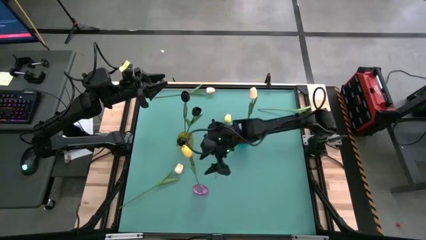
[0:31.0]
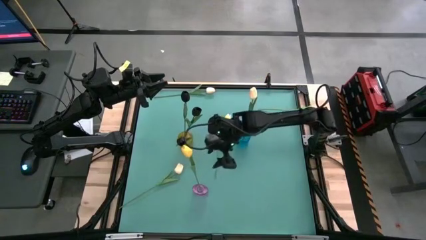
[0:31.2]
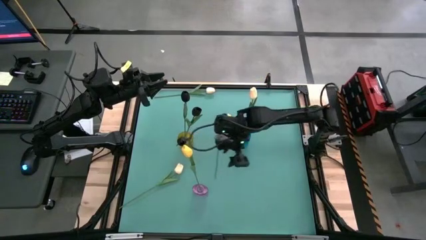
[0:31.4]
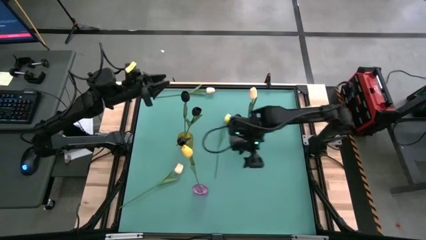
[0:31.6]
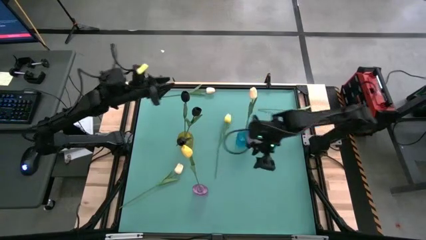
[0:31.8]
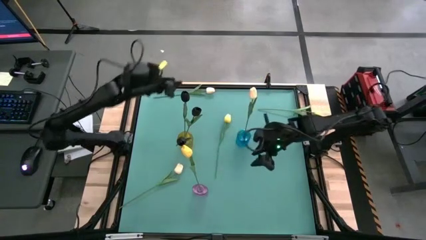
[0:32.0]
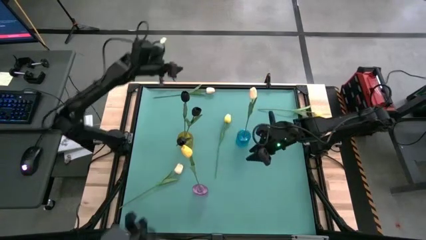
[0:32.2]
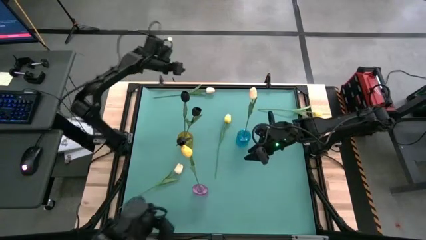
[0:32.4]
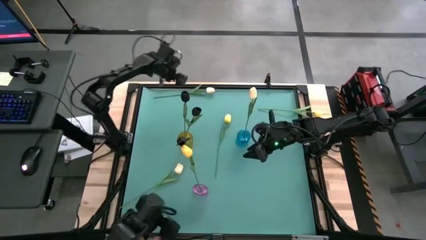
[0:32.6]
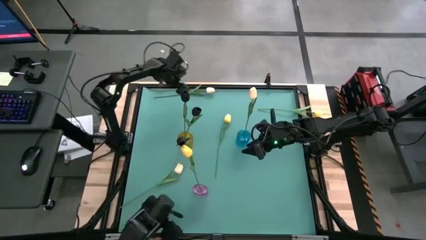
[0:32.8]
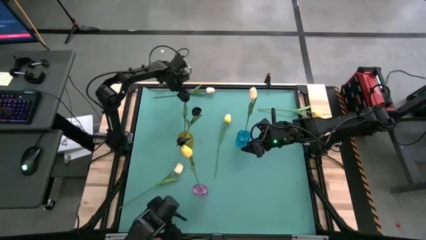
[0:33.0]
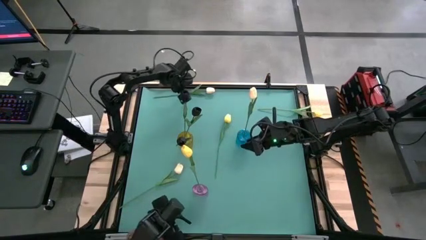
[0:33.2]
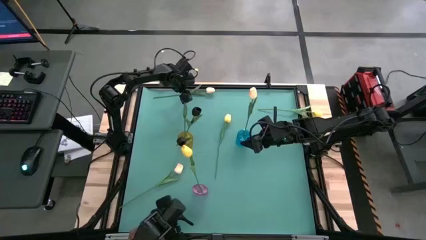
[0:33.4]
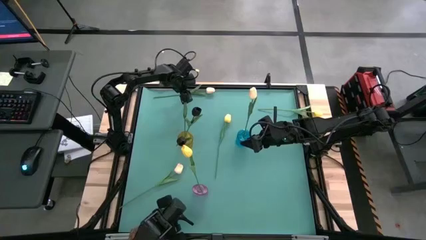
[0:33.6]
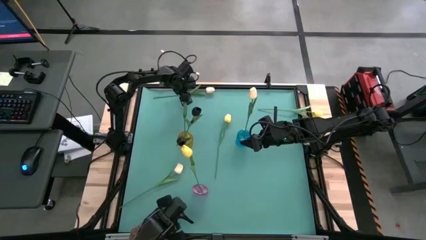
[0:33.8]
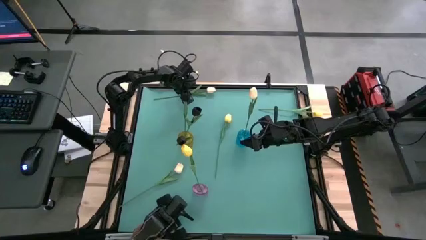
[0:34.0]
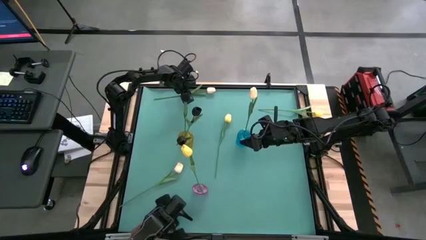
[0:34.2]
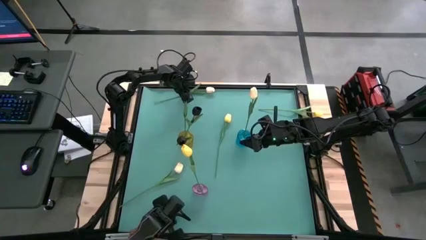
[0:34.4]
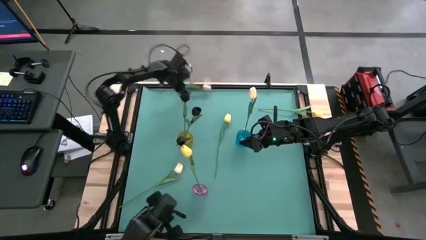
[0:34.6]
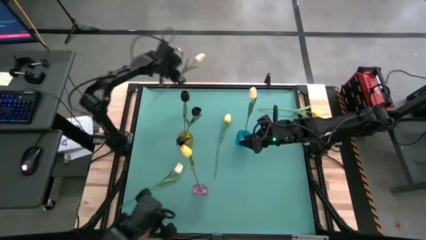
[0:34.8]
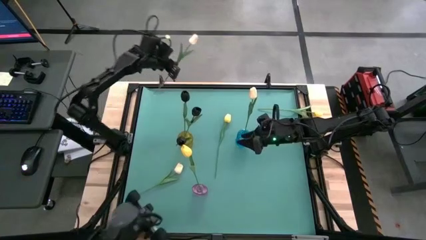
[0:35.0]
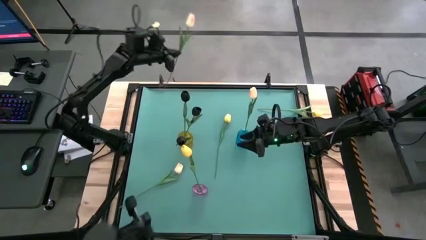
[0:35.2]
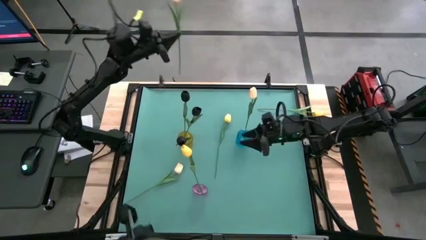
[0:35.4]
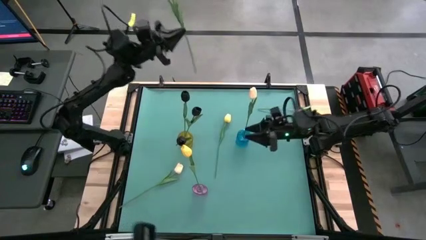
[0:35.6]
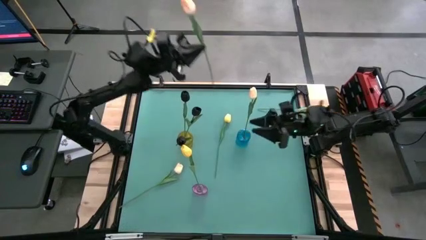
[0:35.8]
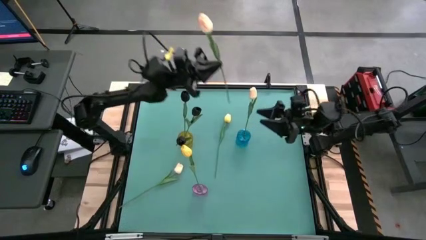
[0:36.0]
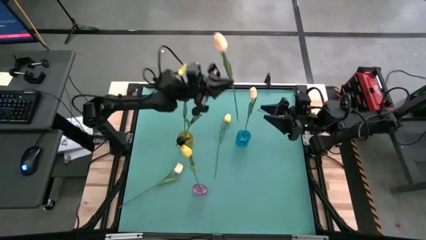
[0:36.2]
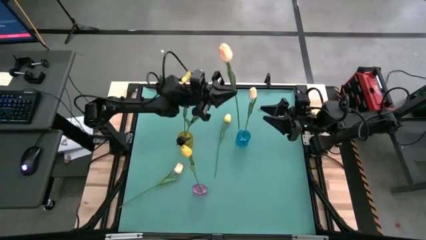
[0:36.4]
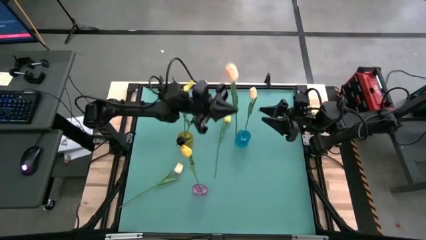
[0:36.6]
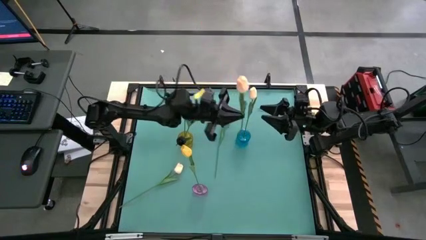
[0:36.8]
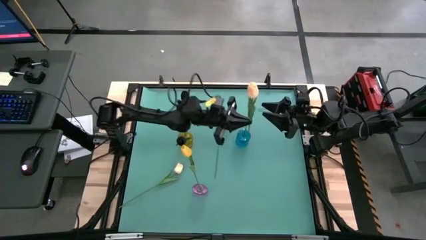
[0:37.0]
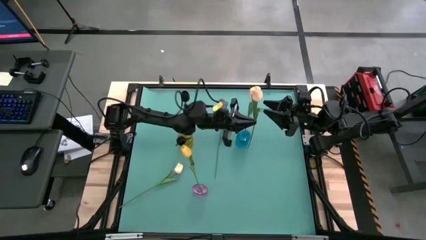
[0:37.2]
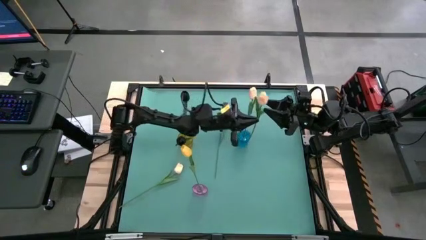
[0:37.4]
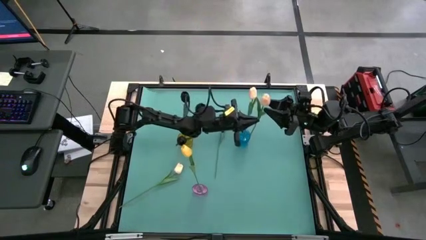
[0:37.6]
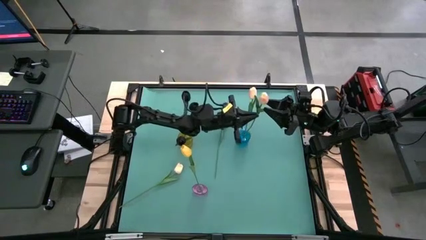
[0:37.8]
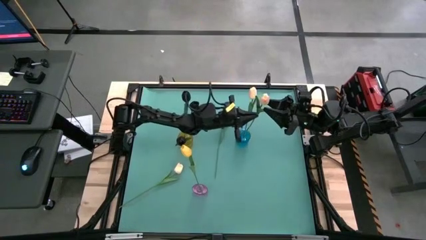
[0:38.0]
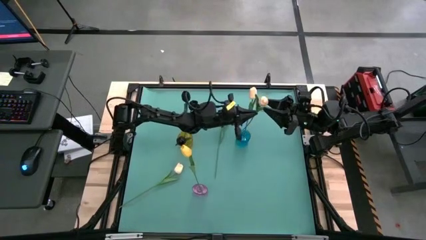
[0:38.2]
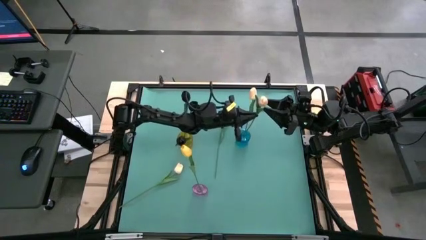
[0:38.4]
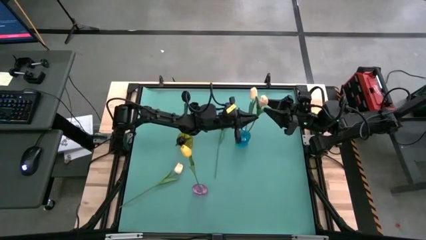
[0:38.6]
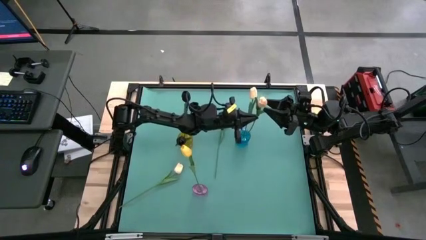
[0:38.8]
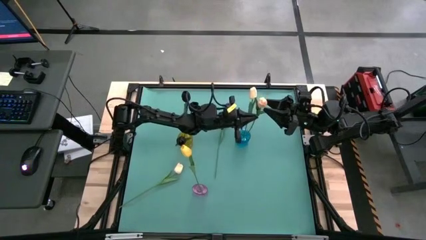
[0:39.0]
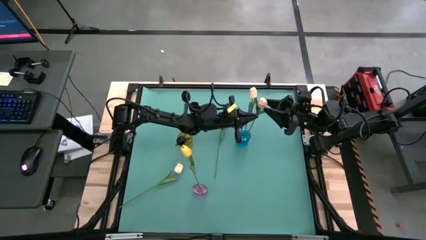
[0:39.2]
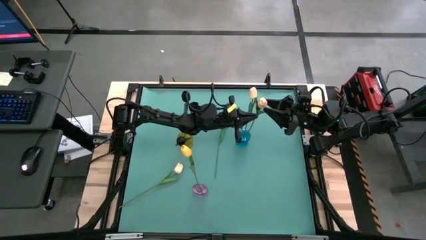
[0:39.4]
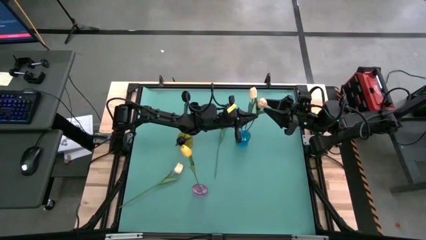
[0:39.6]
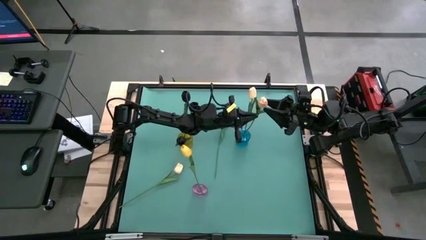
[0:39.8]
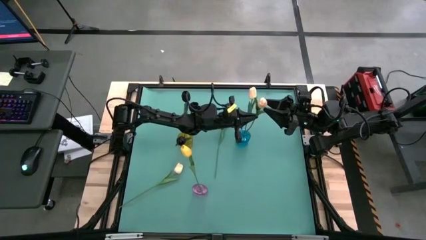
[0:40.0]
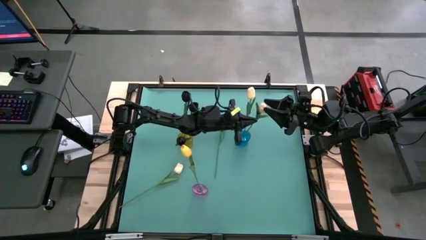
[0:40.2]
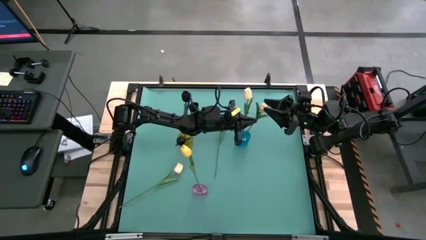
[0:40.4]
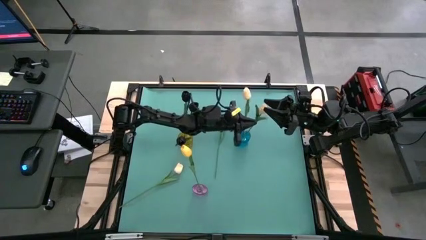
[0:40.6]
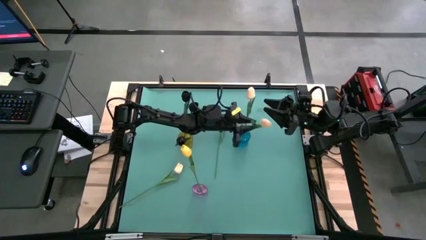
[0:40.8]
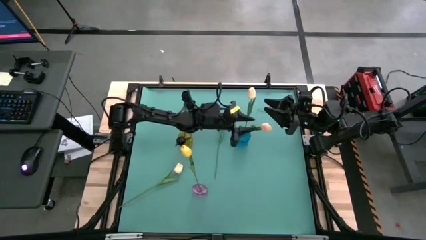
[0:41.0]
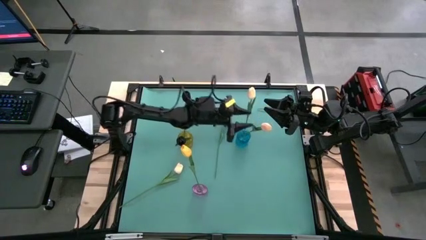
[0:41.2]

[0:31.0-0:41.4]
Task: Sort flowers into vase by color
Put the top white tulip flower into the blue vase
